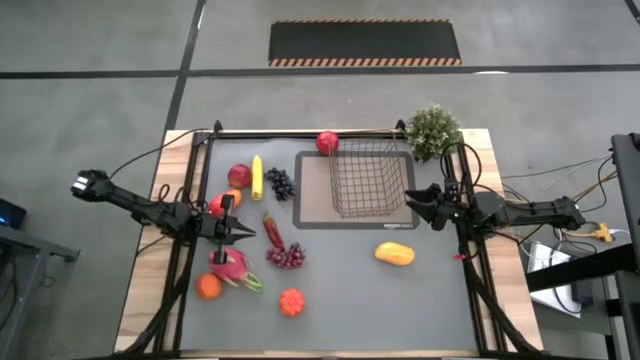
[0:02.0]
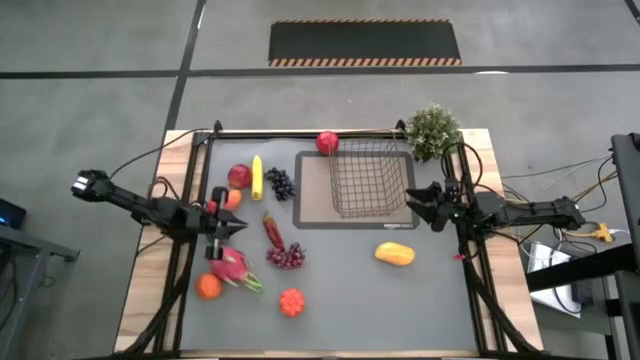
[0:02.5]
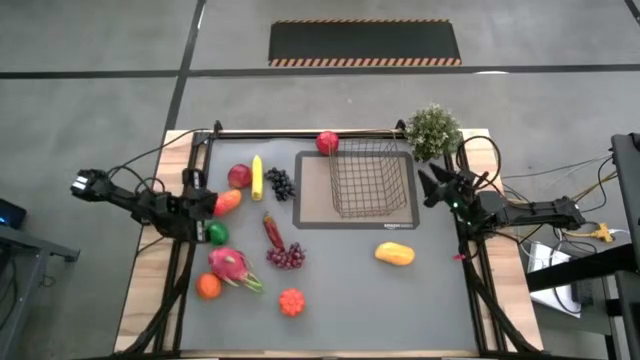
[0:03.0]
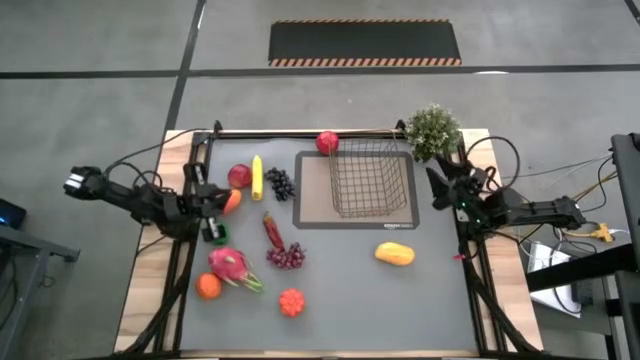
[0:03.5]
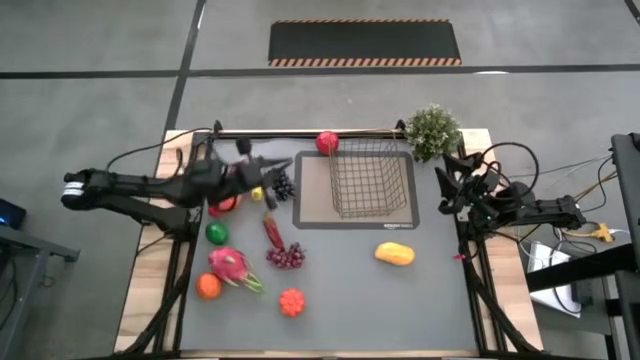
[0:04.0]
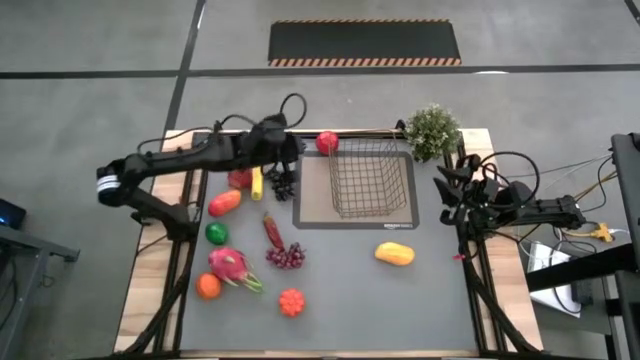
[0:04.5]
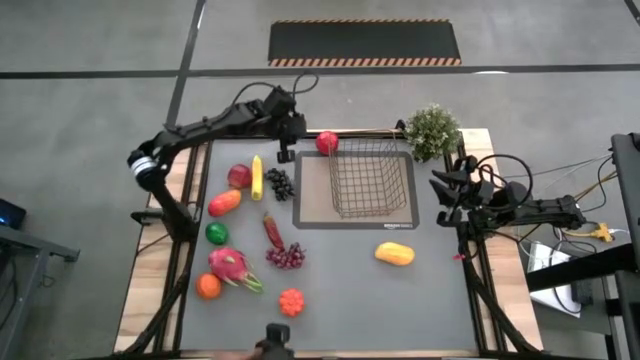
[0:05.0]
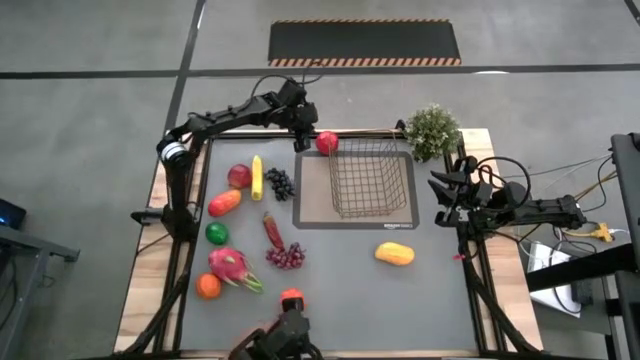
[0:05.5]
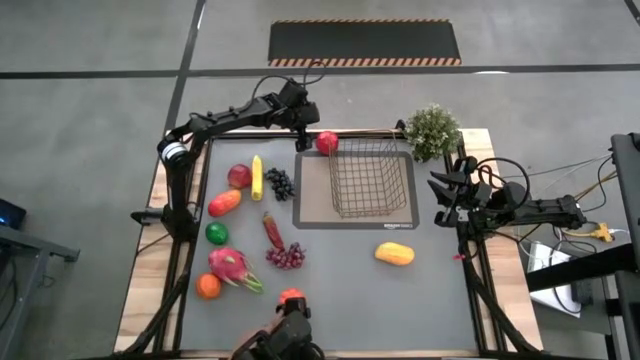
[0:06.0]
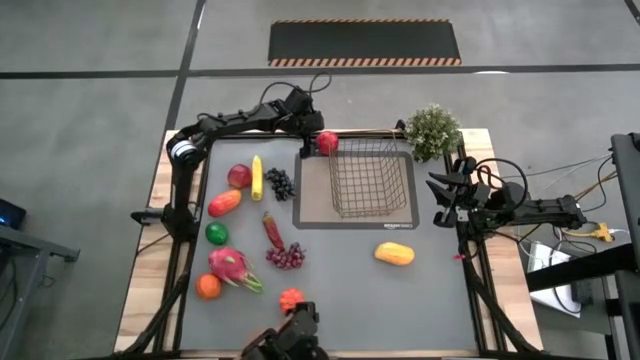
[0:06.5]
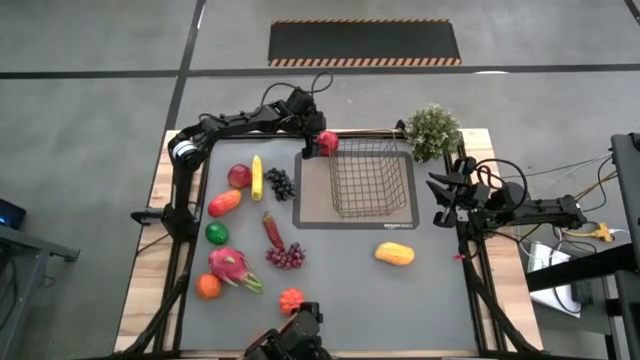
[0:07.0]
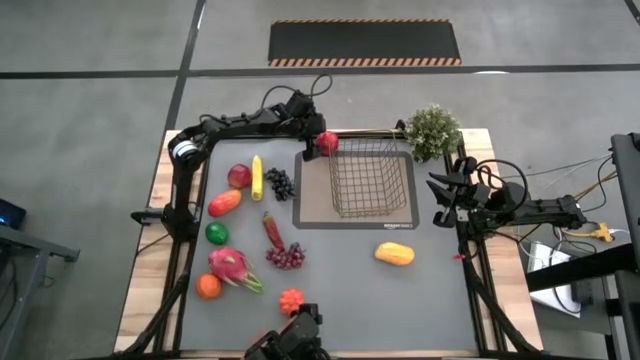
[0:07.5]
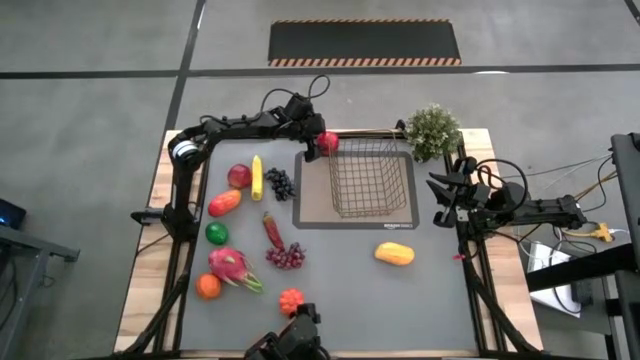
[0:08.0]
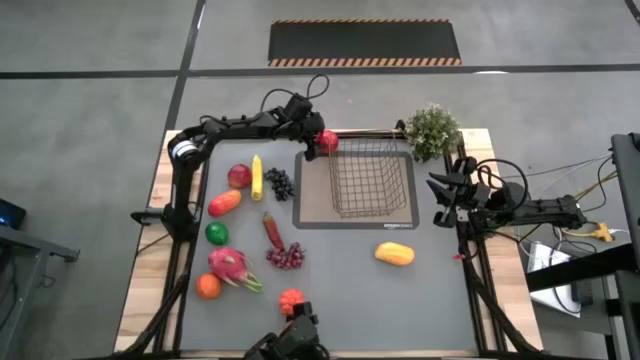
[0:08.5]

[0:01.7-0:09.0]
Task: Build produce basket
Put the apple into the wire basket

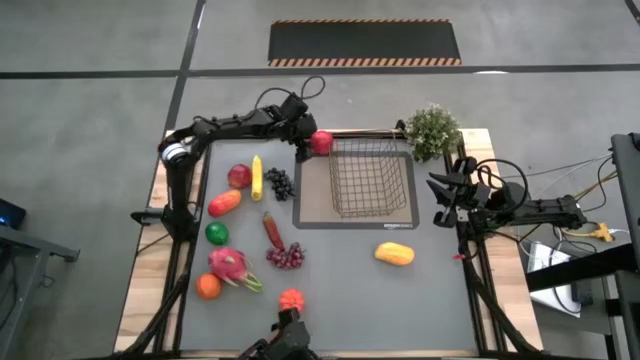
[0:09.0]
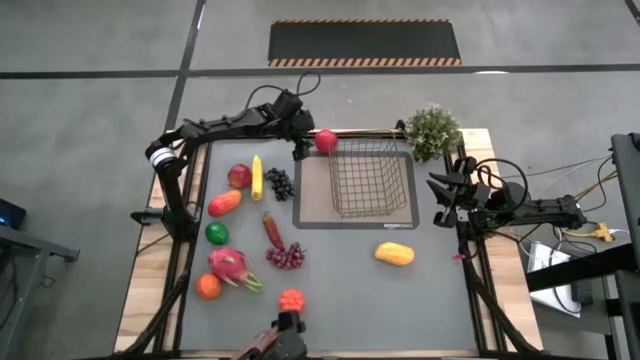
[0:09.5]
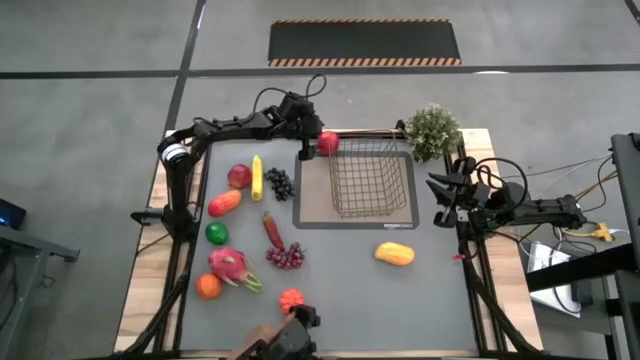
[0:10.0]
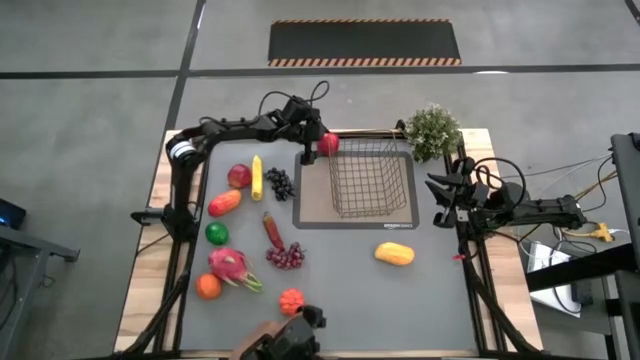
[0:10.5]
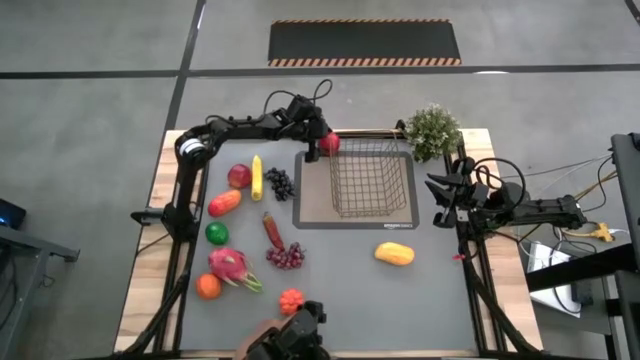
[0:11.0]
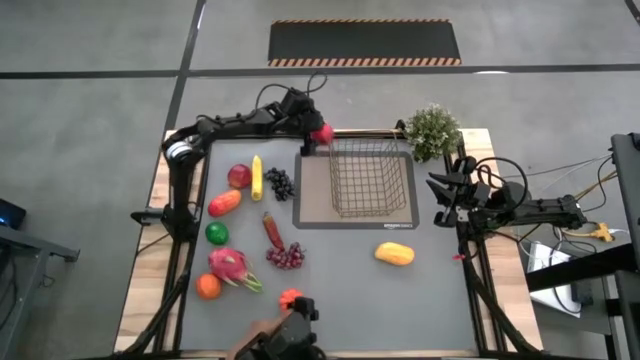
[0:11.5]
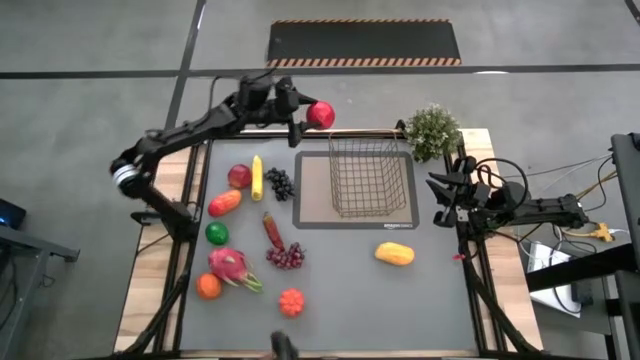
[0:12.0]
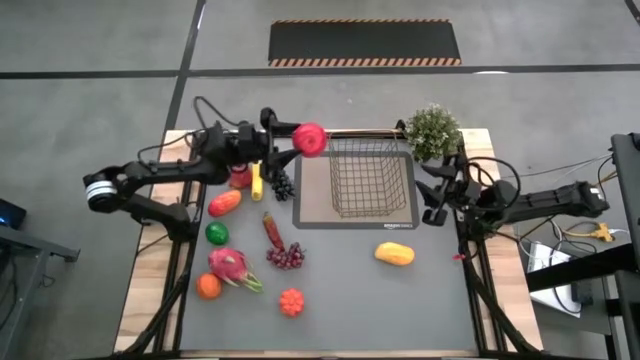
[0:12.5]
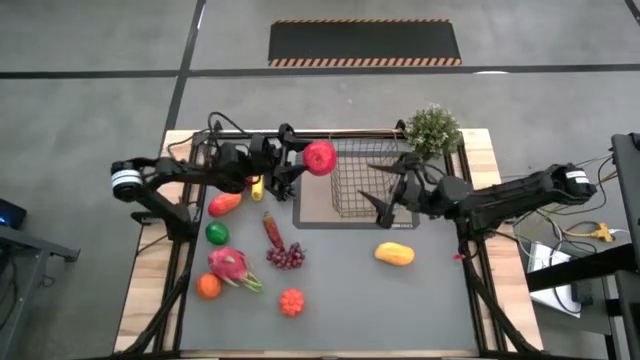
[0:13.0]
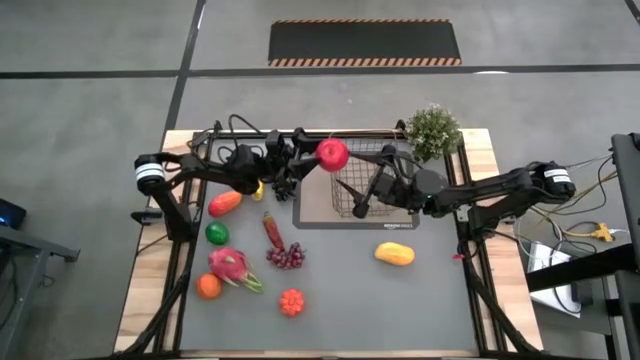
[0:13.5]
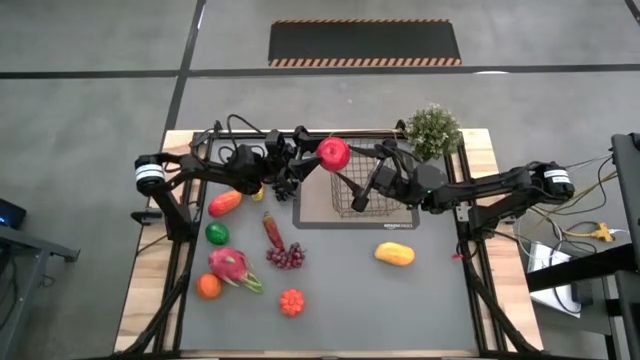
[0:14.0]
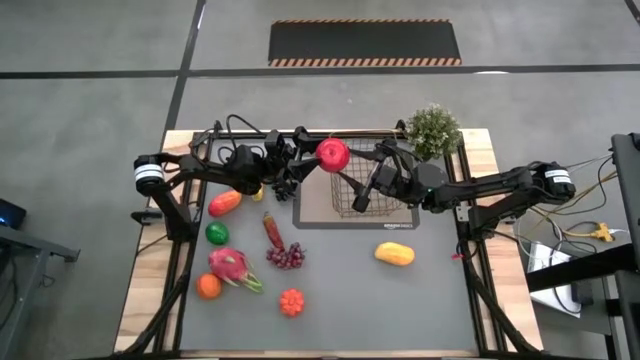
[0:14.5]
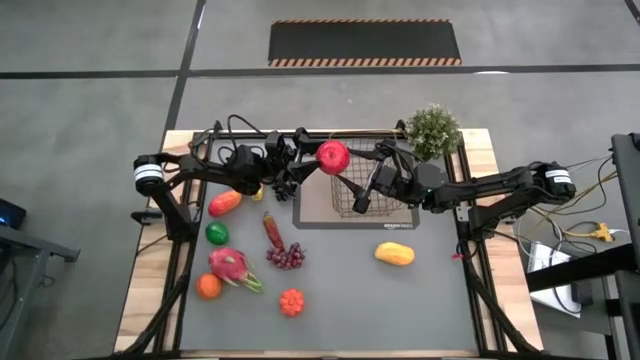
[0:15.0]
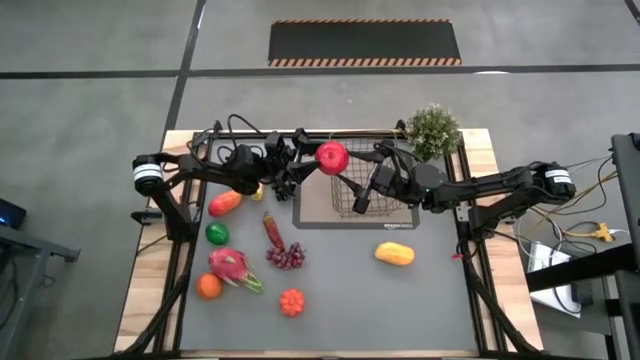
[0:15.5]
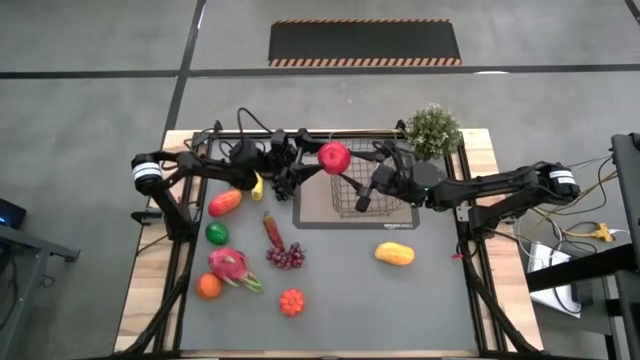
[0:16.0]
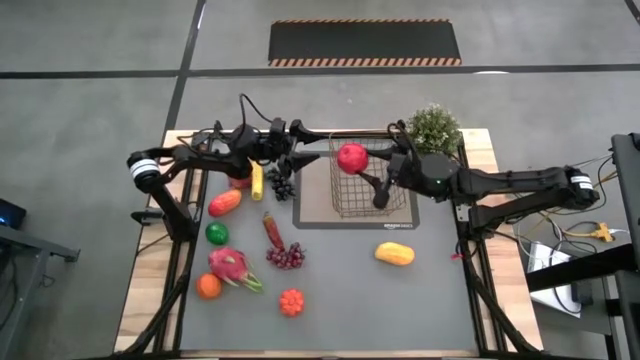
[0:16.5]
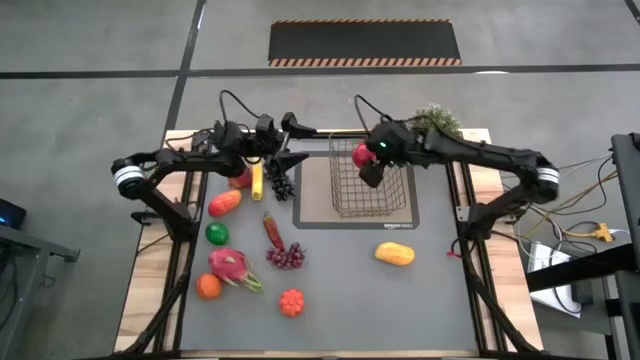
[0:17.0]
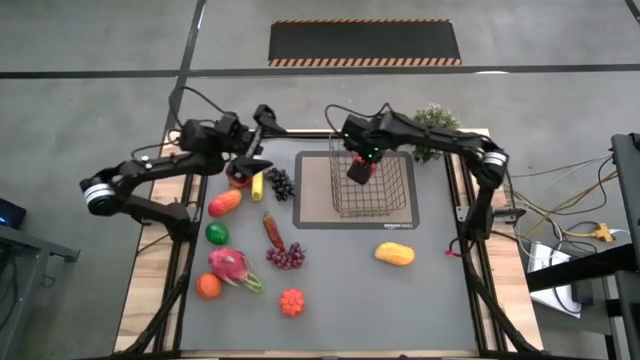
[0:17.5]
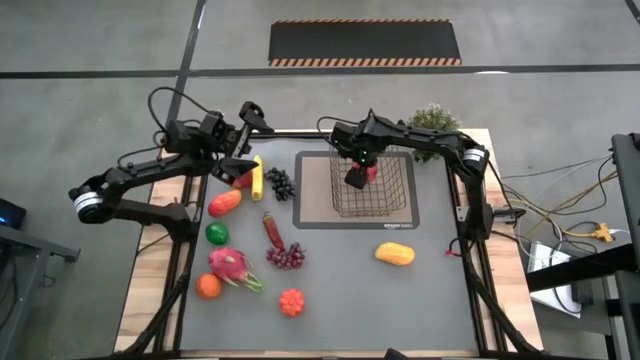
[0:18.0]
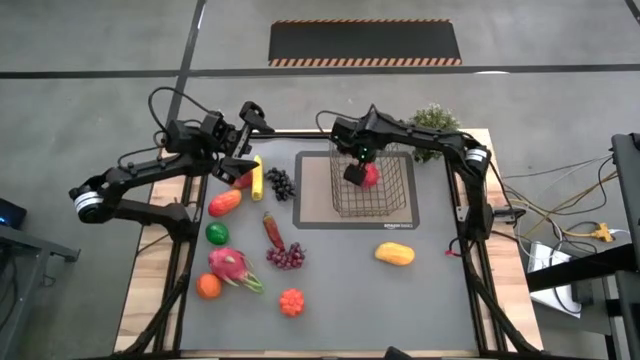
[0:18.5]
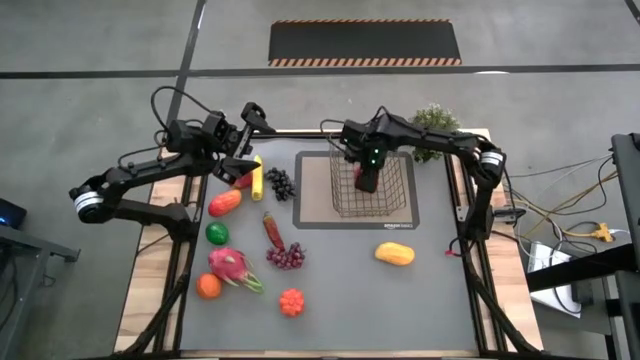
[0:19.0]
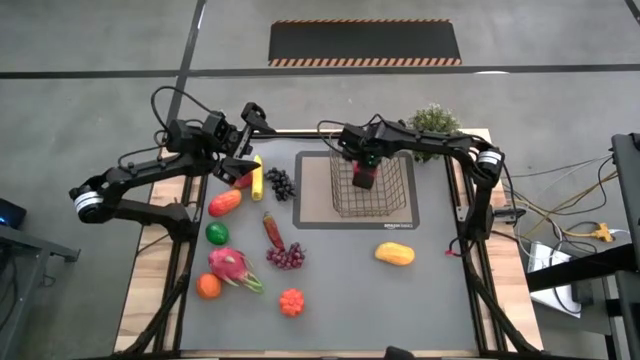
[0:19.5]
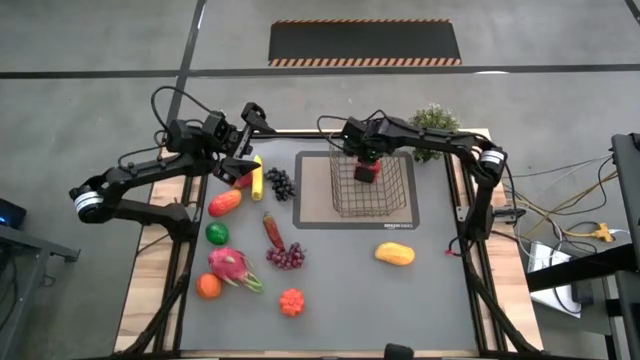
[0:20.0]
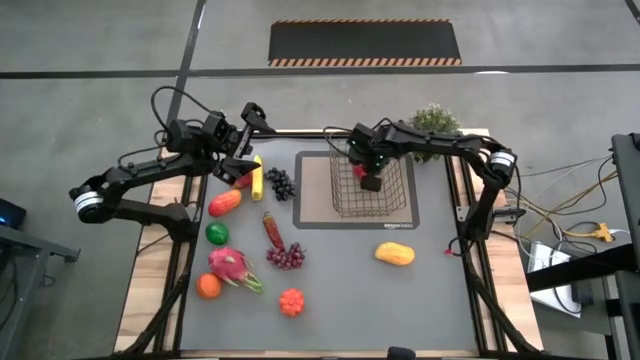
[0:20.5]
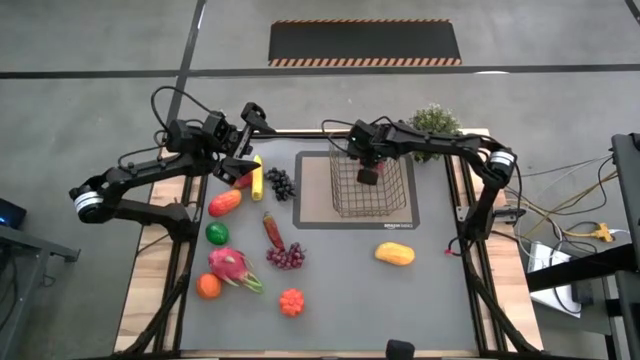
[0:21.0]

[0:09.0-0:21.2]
Put the apple into the wire basket
